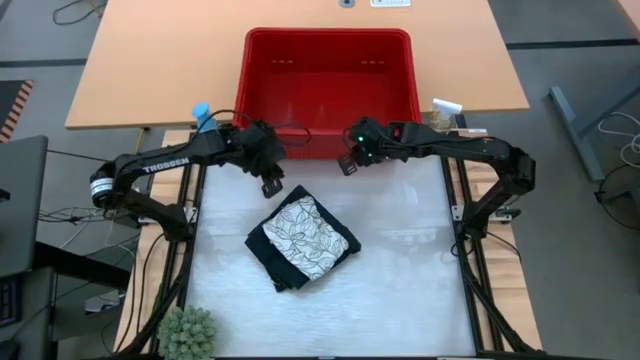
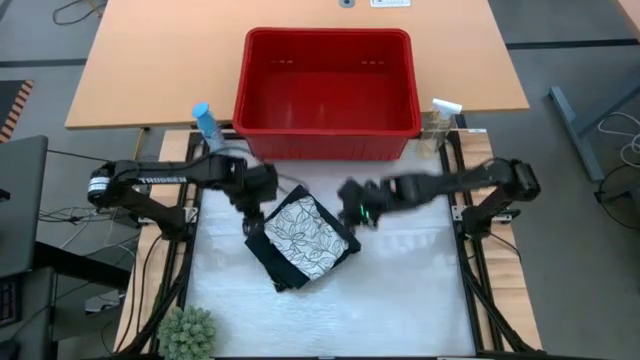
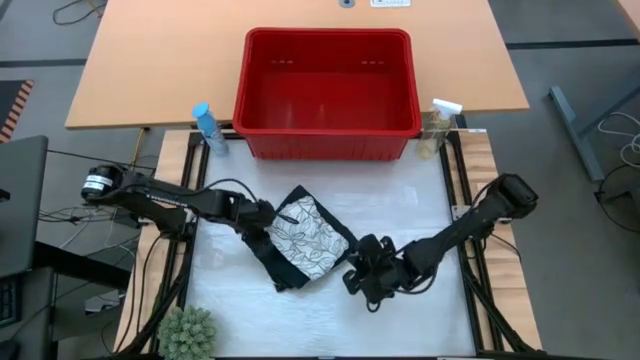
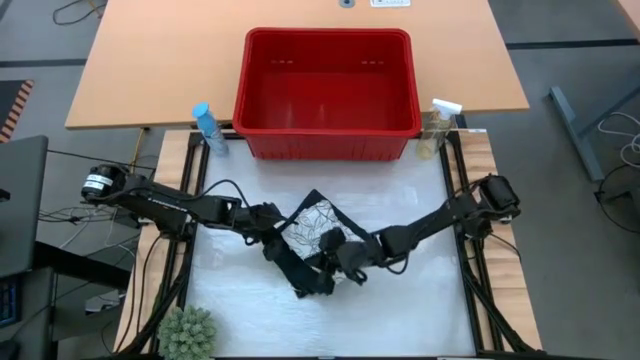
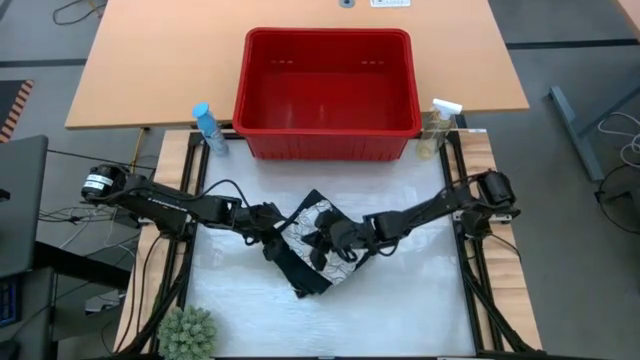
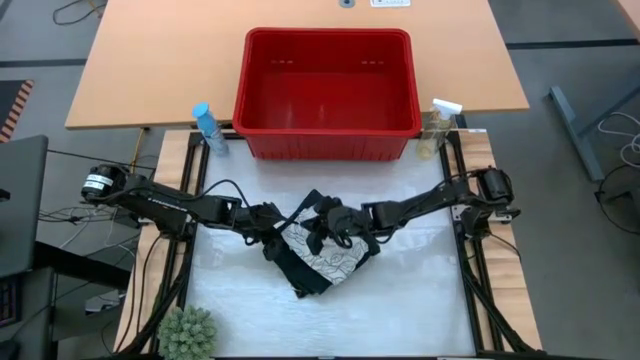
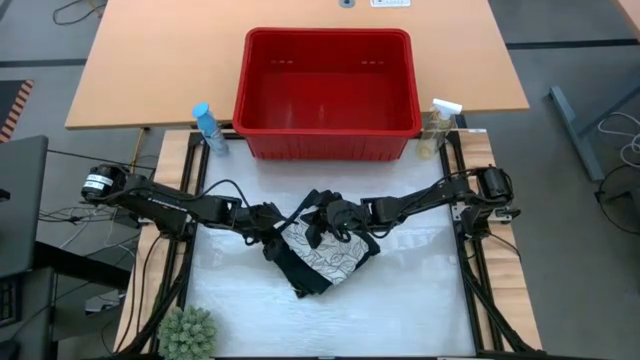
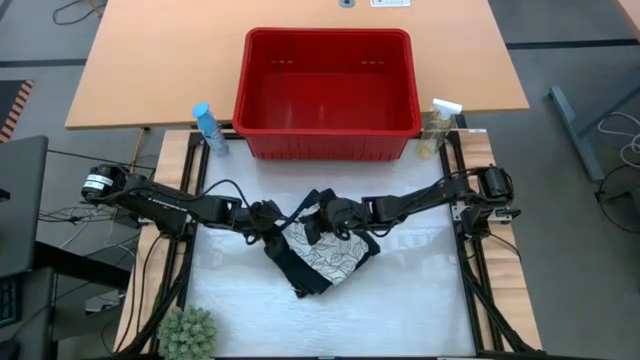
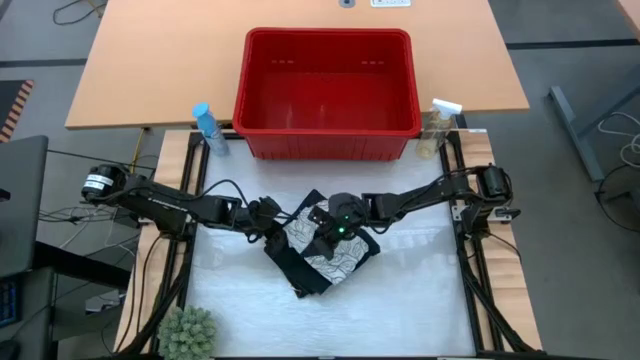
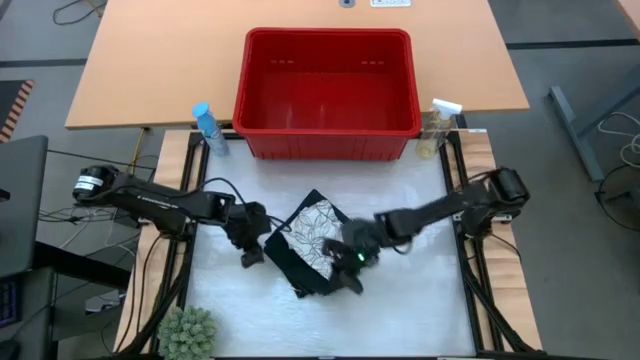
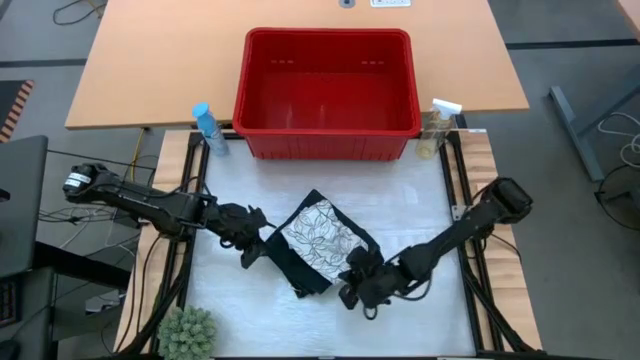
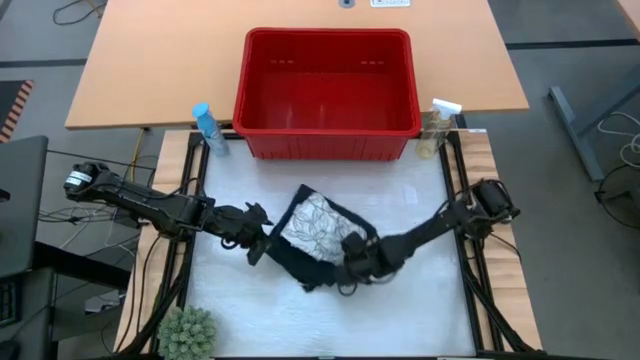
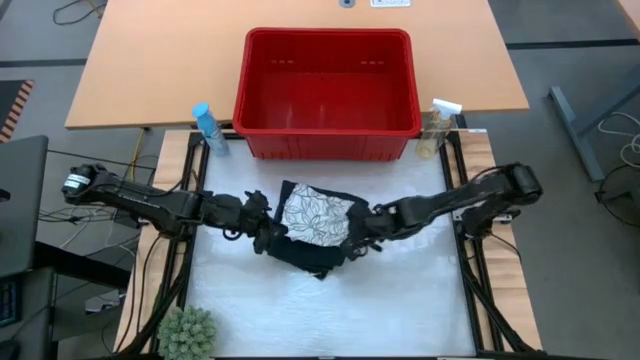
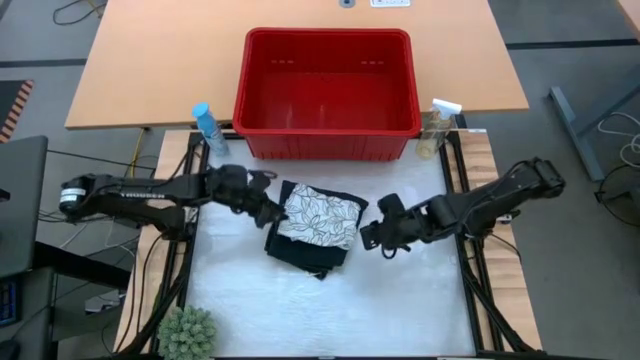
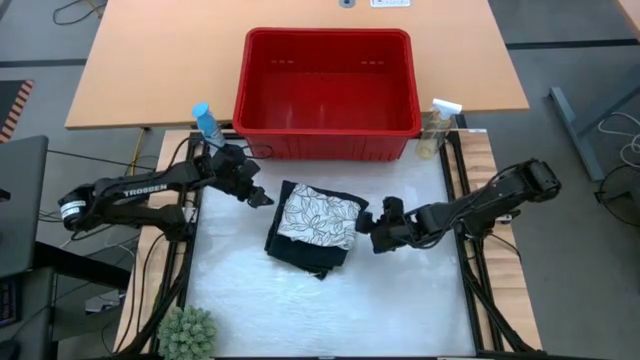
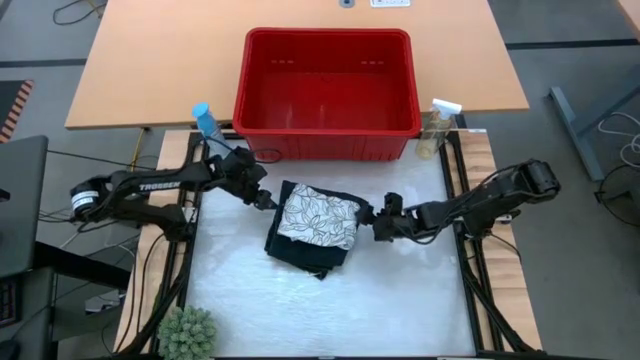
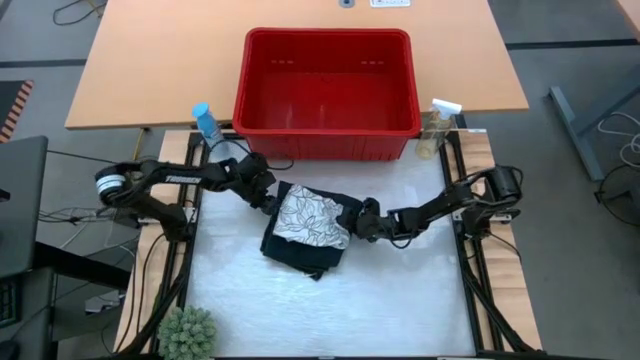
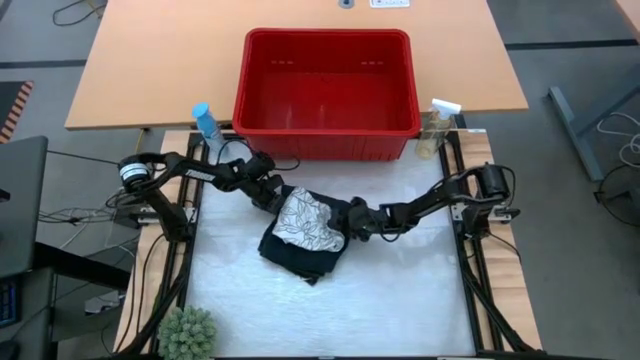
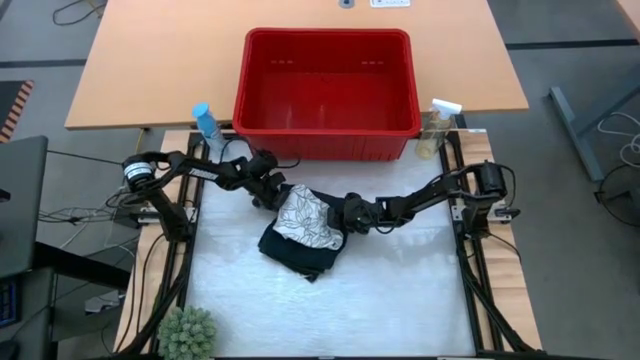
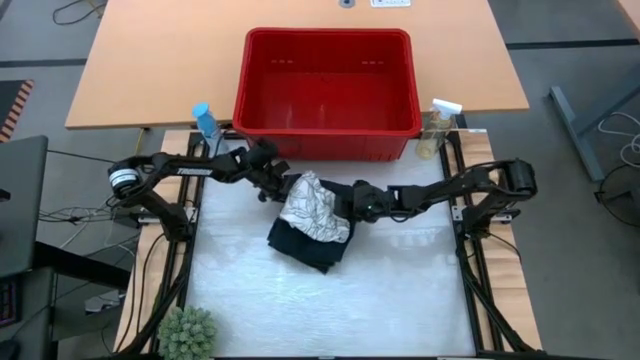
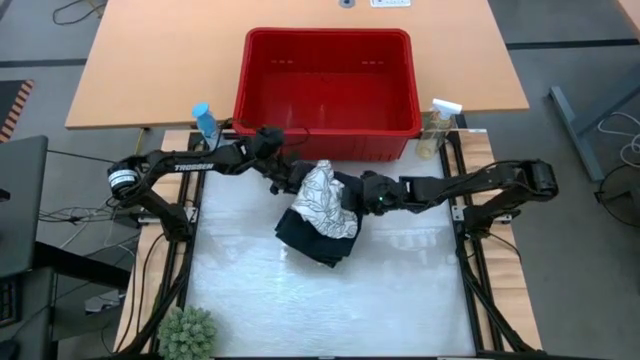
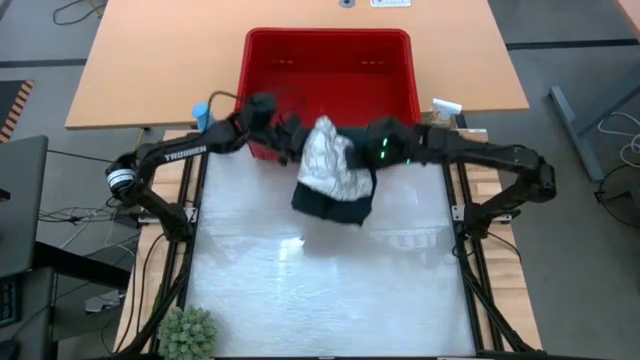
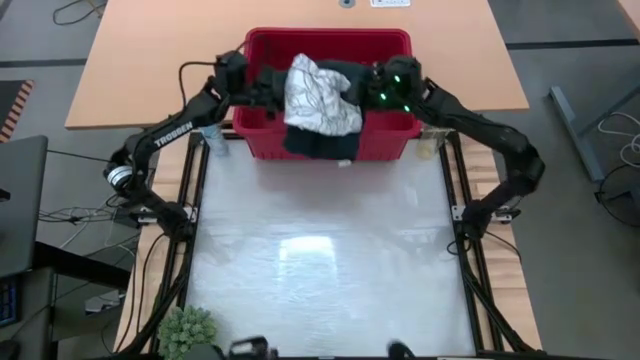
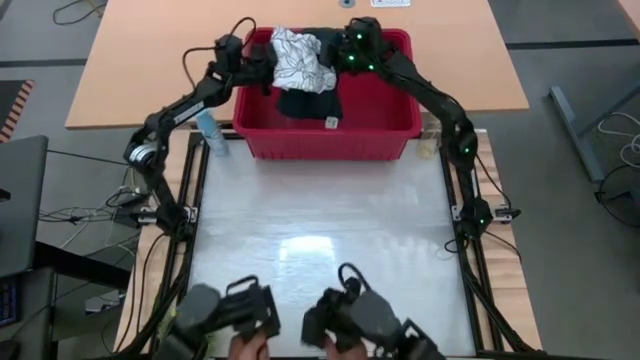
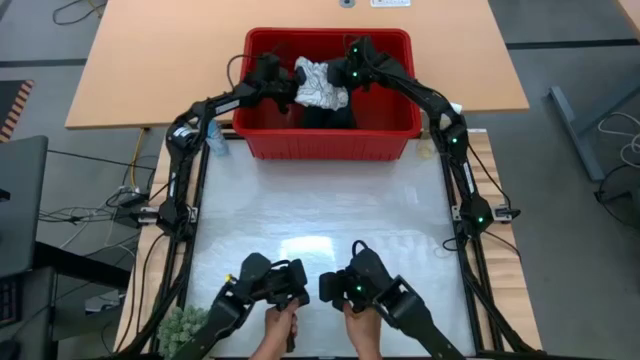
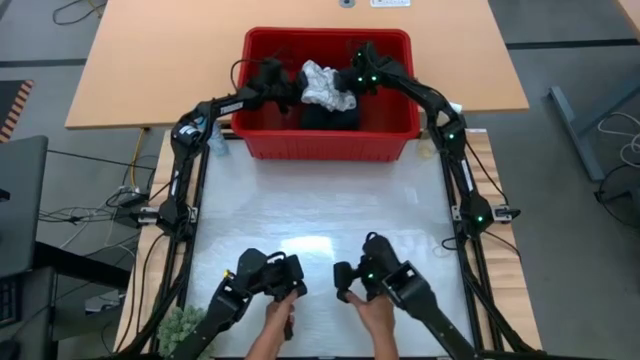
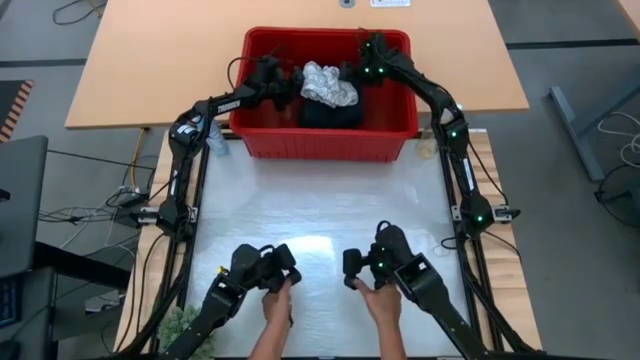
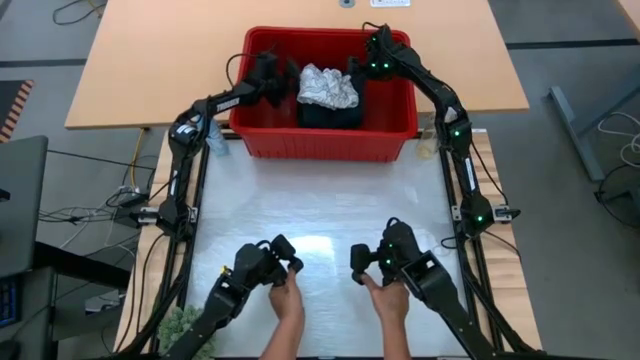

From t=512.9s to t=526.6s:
Task: Fold Laundry from Bin
Put the stack of folded clothes into the red laundry bin

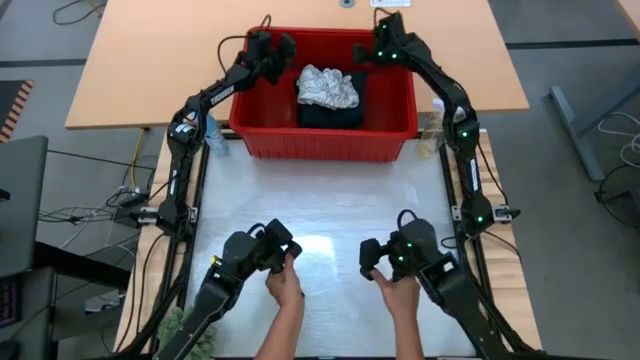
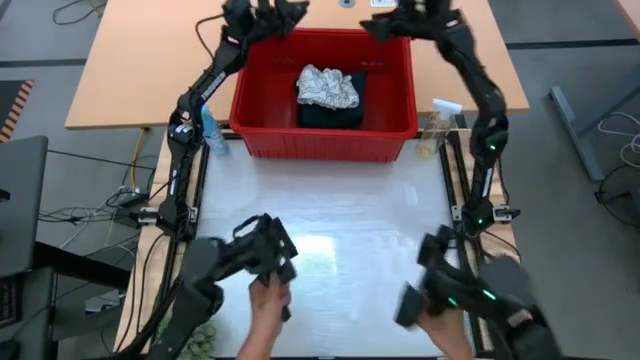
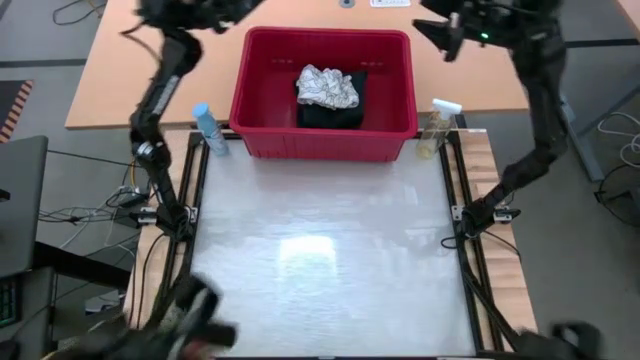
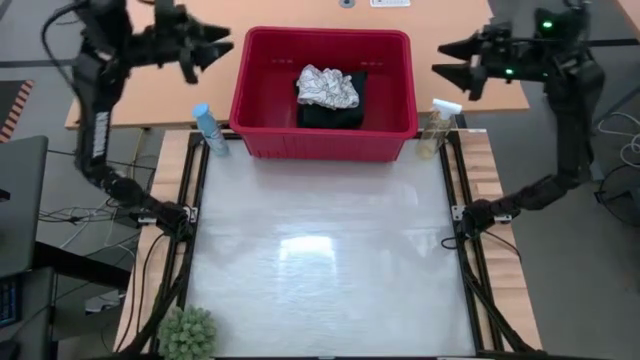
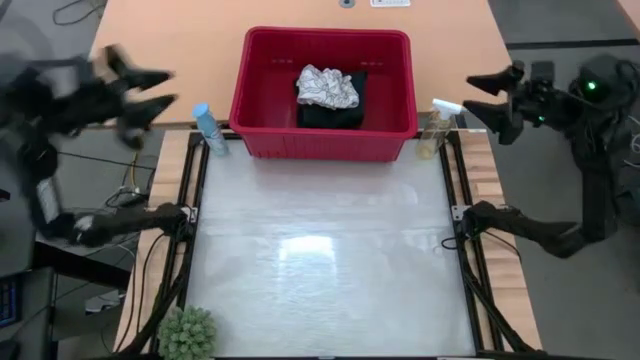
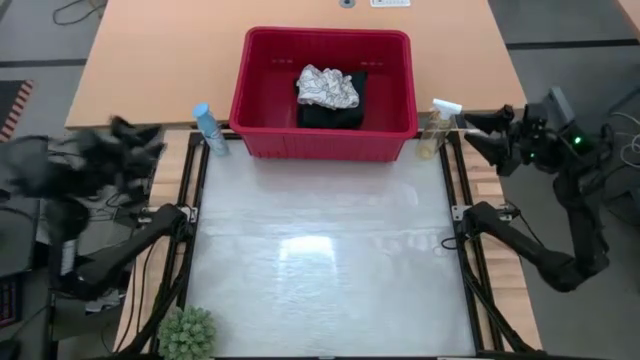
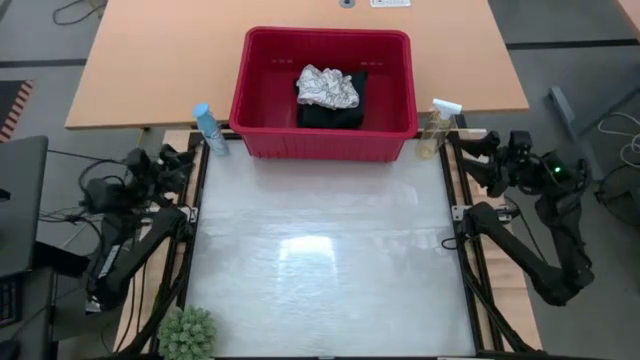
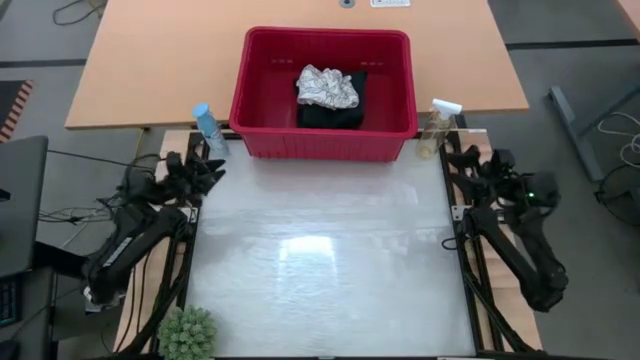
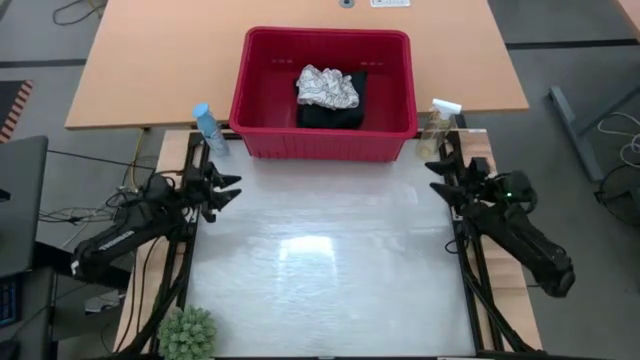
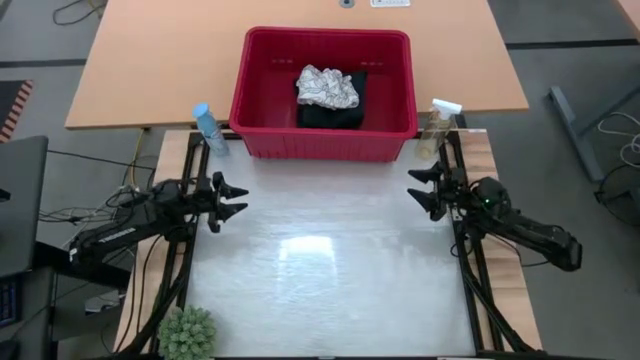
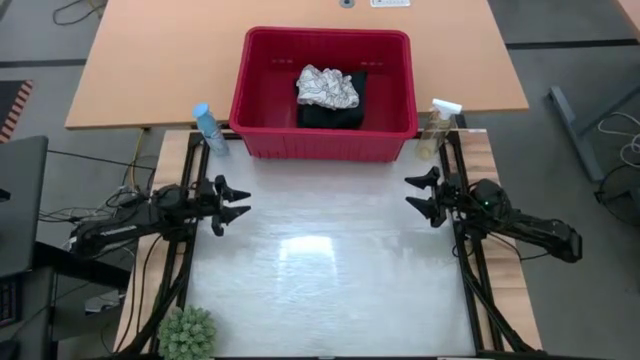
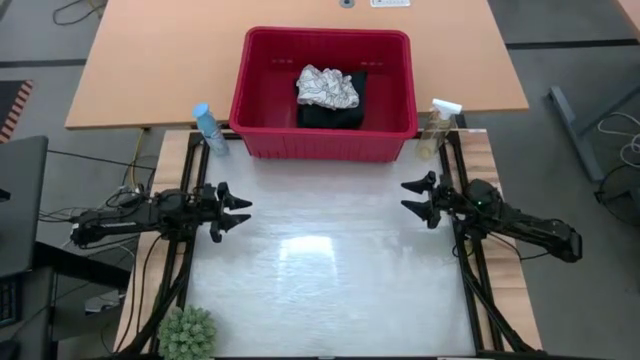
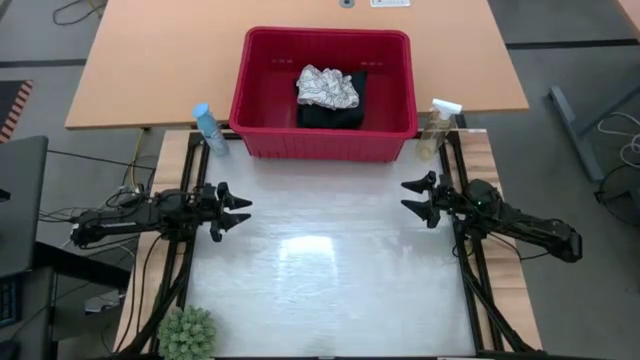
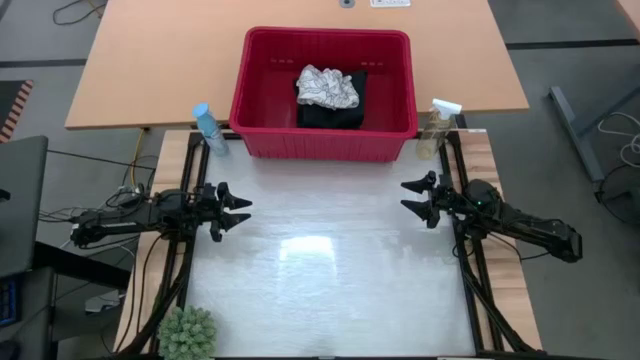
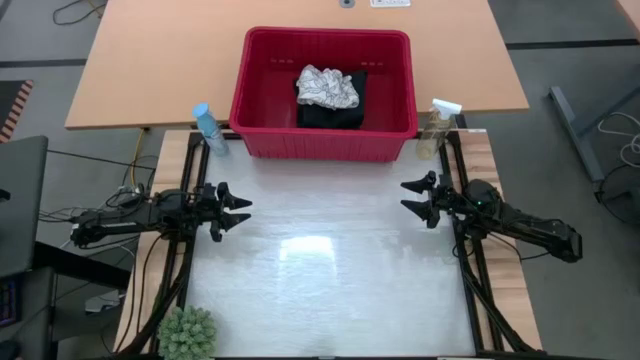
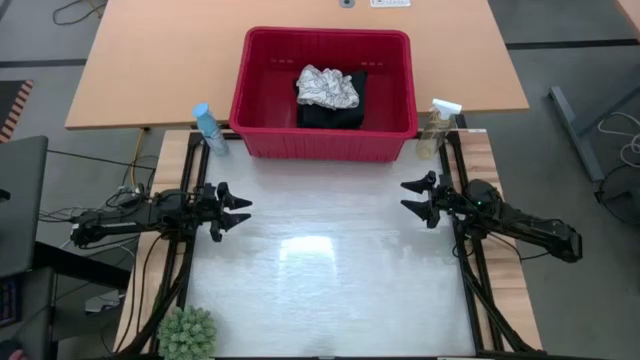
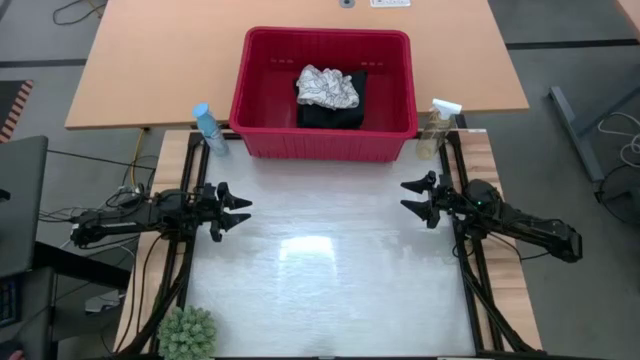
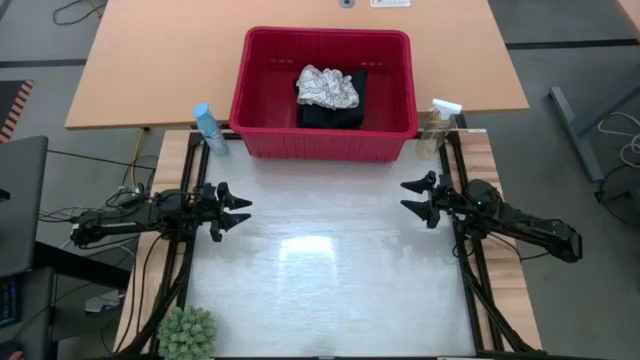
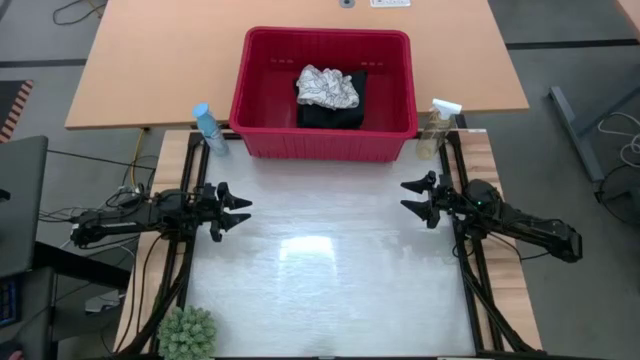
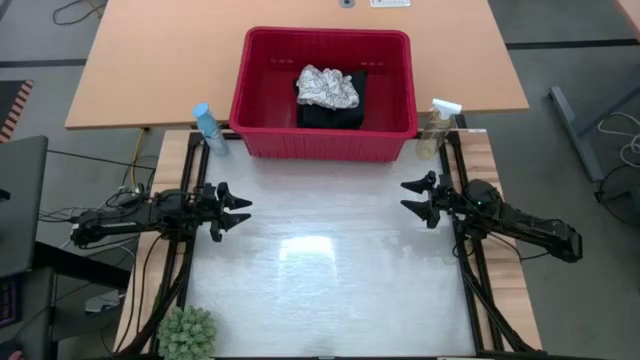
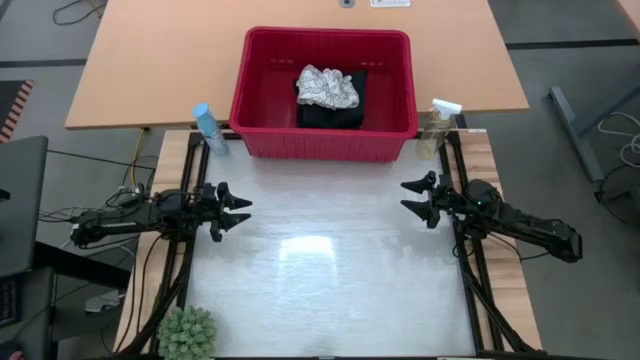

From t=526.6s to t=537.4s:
Return to Home Position
